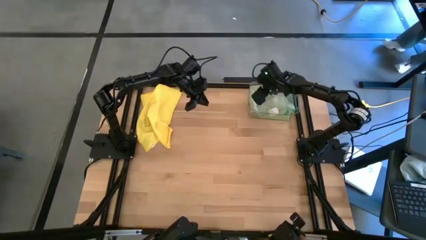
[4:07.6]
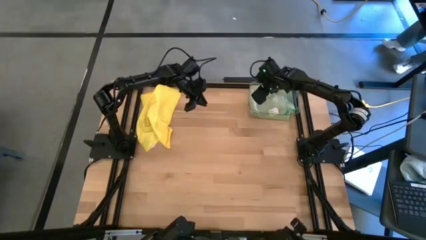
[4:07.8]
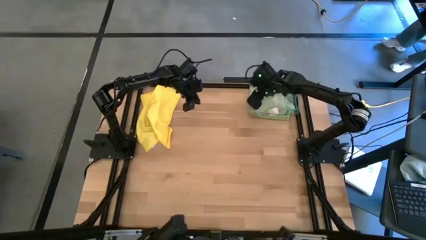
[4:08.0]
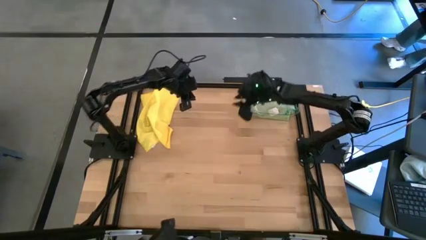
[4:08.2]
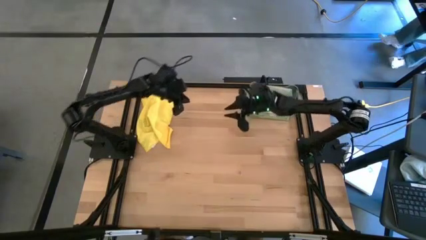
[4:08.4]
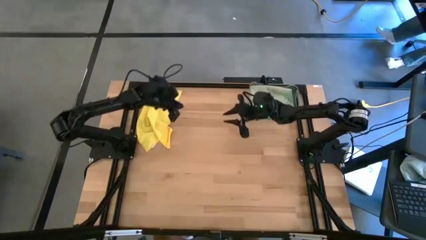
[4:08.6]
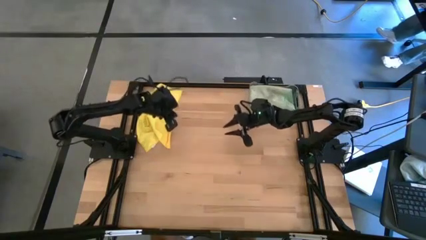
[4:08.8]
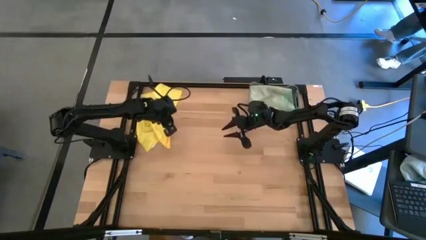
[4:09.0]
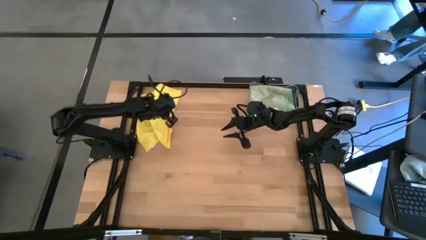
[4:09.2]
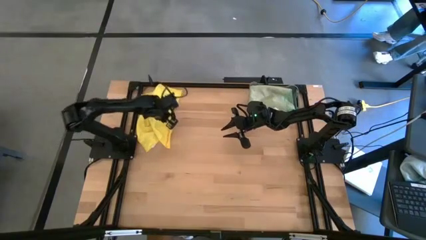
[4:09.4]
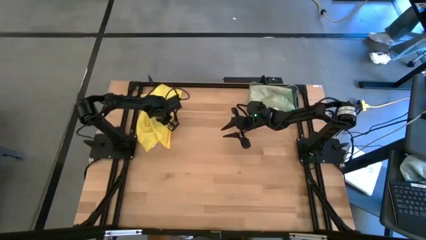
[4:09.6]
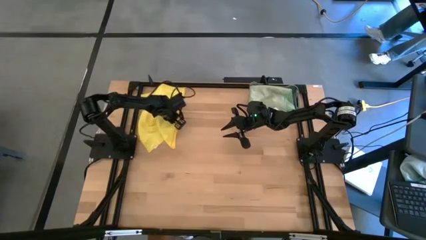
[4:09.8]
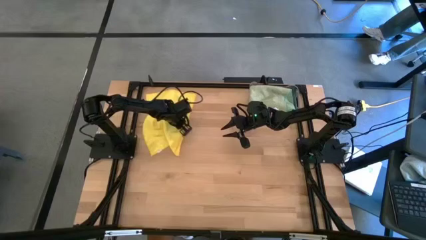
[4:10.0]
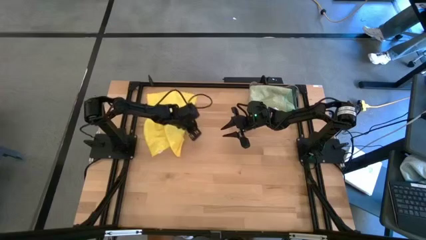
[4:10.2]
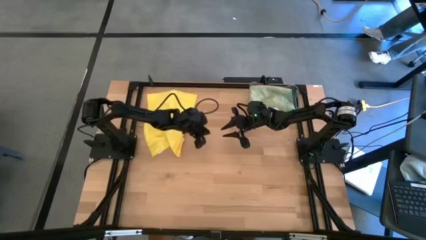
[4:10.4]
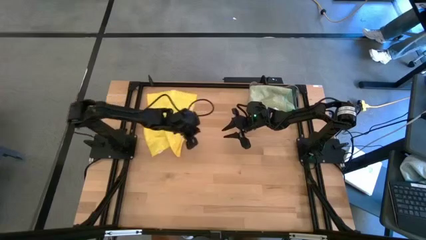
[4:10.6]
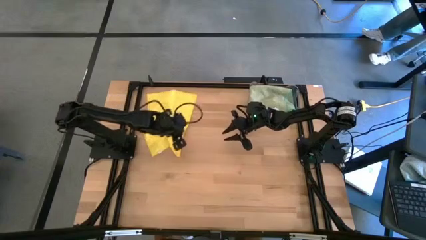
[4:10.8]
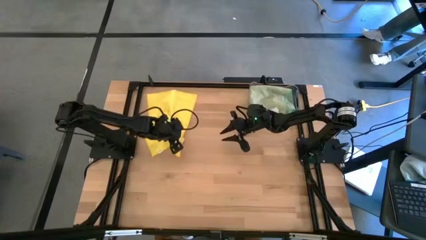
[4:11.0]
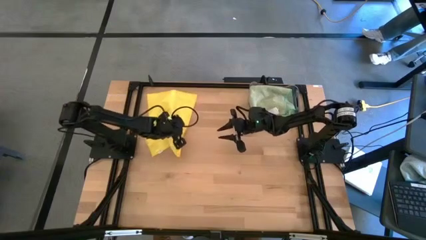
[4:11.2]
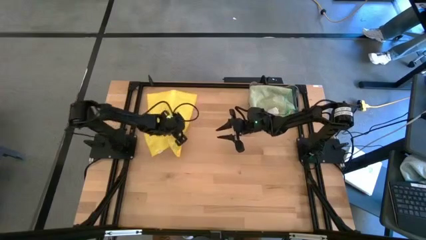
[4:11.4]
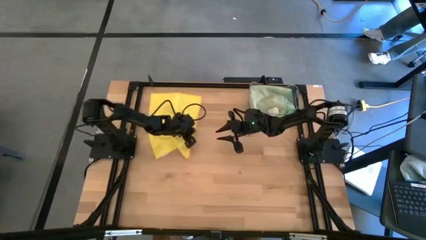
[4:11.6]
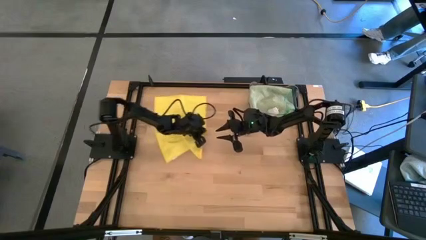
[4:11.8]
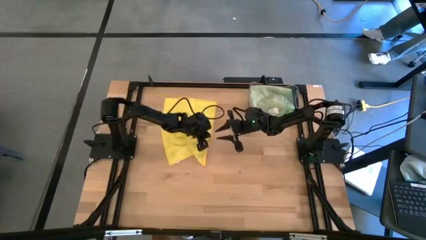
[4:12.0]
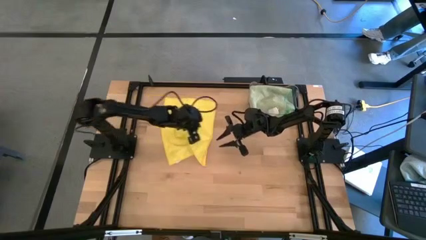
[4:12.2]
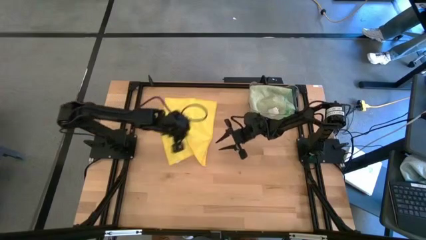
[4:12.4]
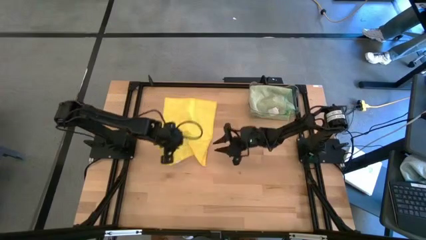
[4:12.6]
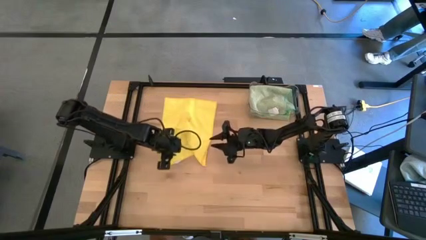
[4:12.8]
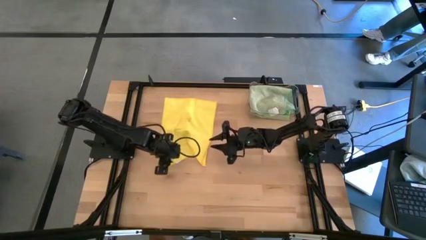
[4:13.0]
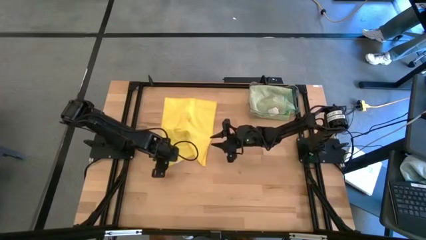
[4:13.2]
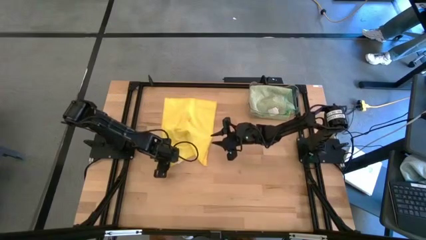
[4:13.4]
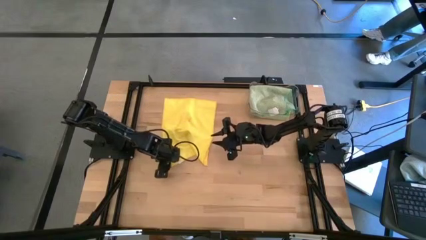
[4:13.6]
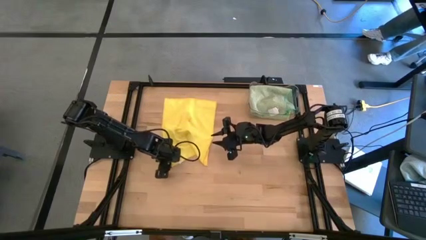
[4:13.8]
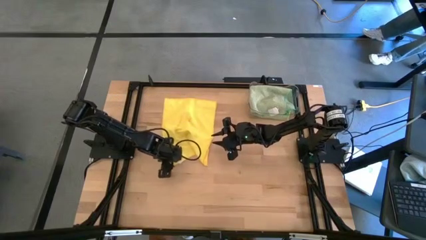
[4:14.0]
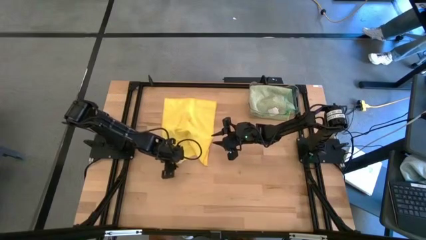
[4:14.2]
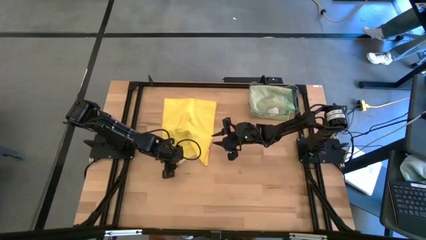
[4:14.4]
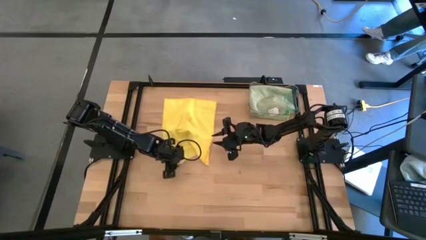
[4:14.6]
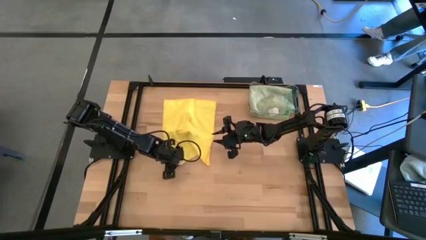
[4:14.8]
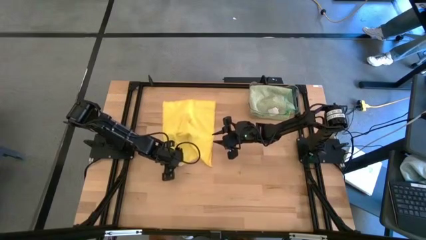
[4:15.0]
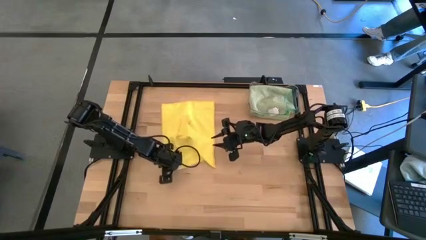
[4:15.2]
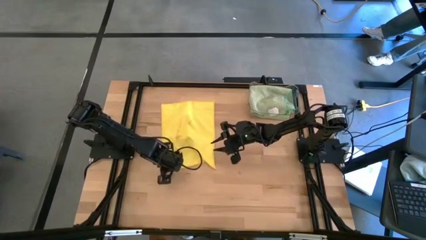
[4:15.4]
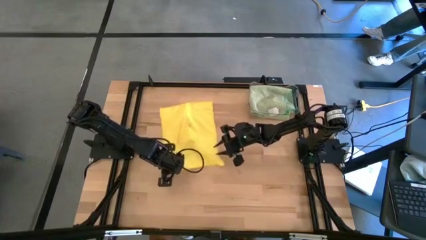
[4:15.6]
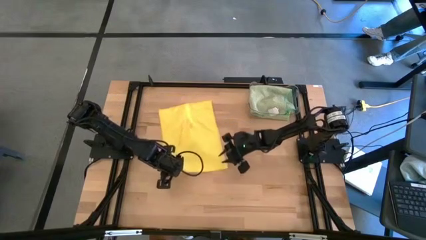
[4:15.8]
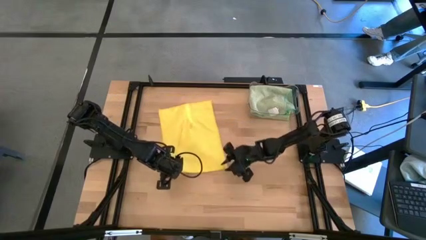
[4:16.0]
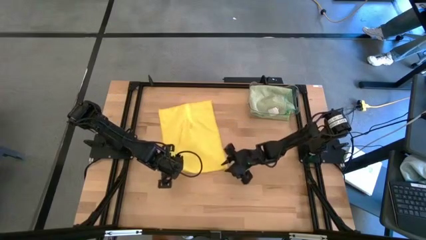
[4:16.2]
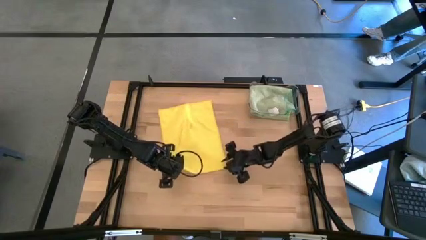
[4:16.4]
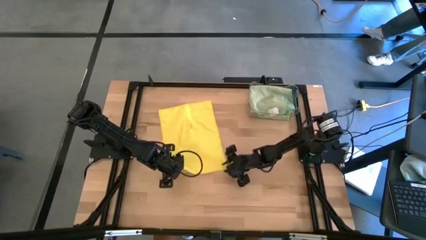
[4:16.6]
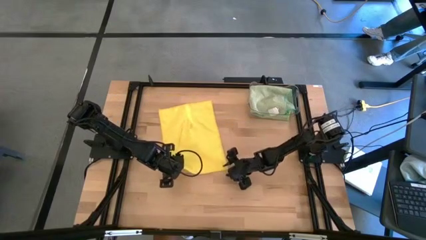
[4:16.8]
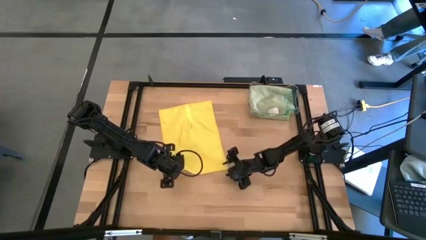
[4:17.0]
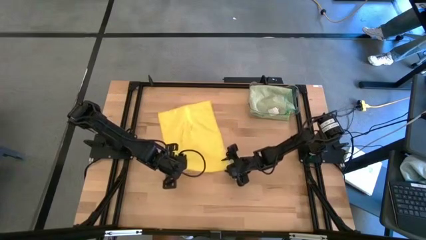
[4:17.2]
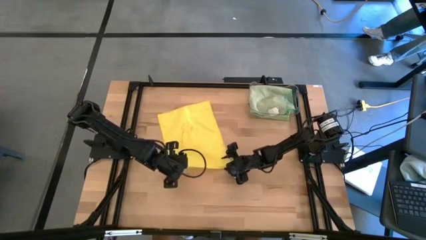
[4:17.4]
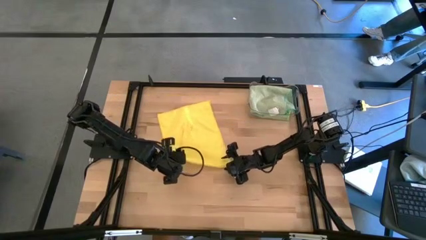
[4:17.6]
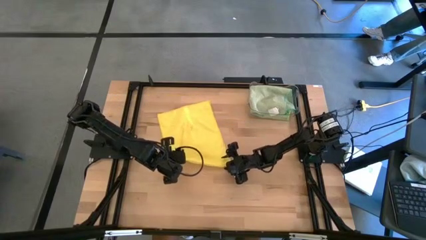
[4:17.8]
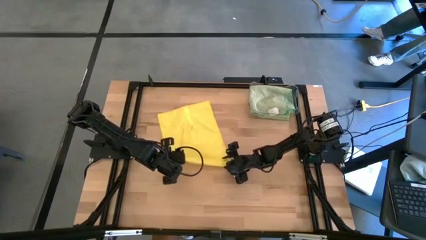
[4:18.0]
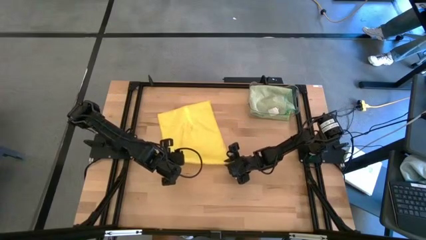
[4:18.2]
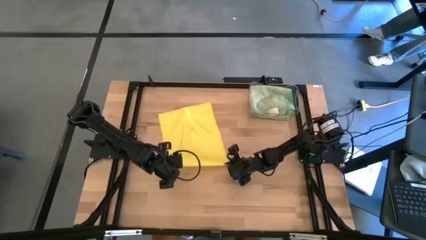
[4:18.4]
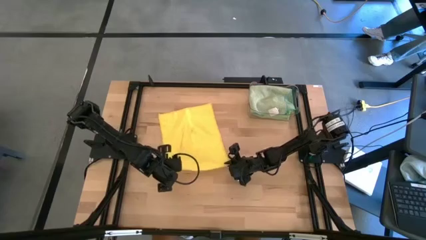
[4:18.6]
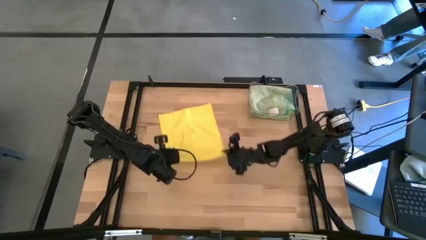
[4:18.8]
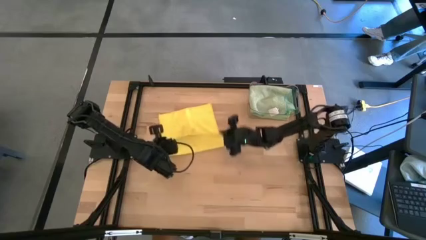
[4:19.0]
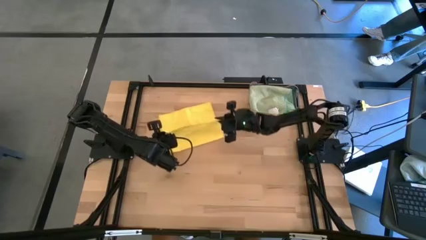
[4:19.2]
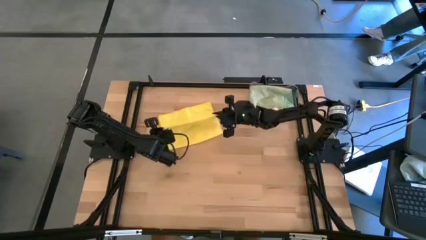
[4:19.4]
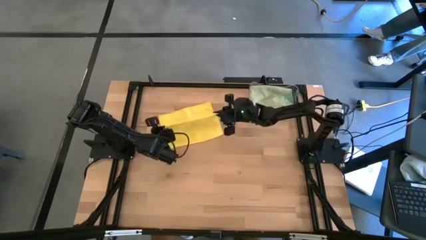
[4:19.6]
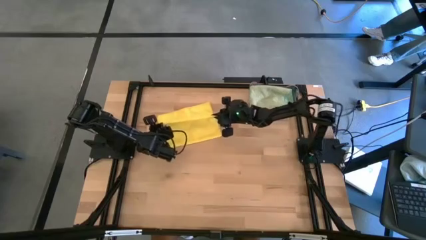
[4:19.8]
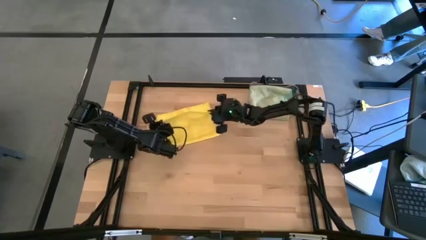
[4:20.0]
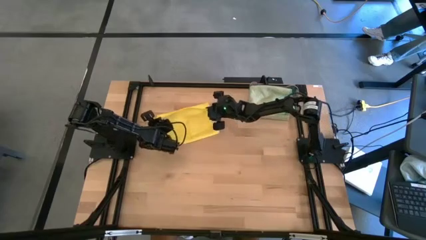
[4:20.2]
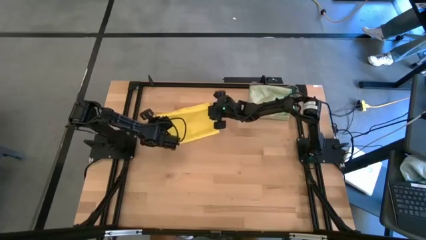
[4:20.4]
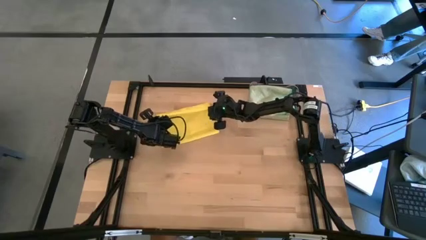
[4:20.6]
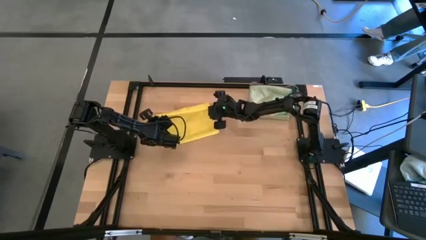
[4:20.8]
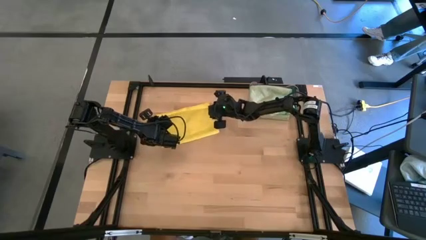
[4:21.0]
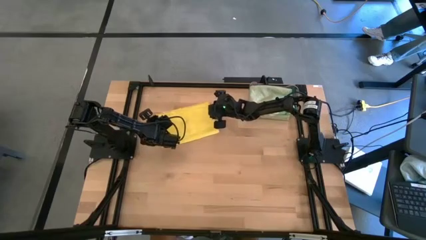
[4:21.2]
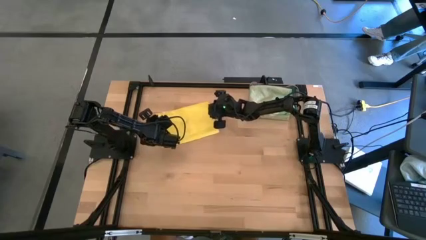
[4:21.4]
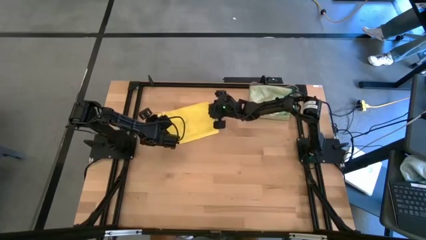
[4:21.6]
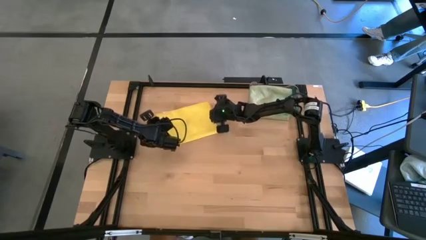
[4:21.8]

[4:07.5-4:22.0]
Task: Fold microfiber towels
Fold the yellow cloth

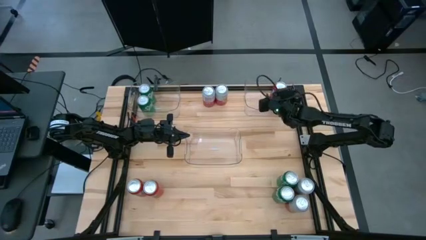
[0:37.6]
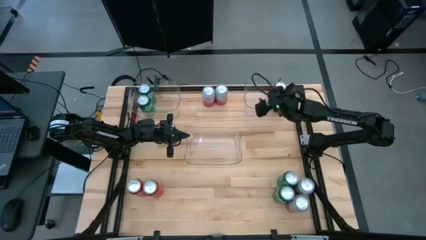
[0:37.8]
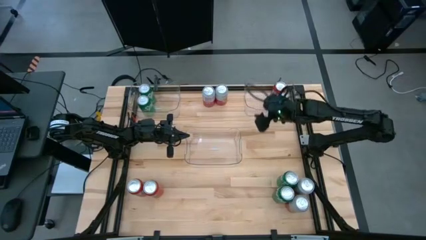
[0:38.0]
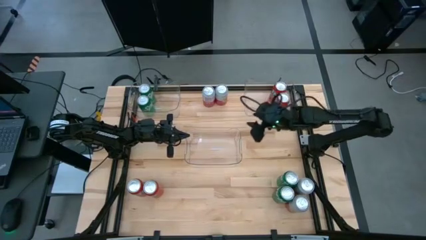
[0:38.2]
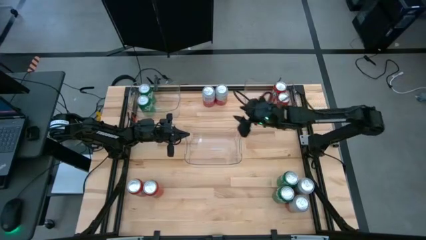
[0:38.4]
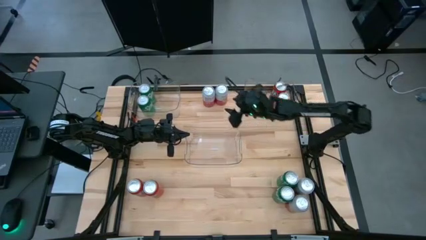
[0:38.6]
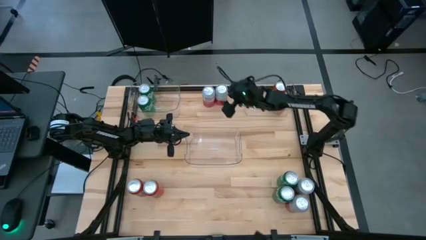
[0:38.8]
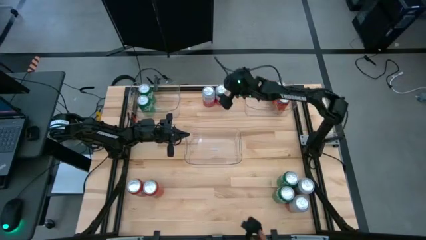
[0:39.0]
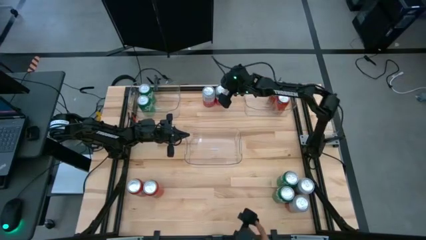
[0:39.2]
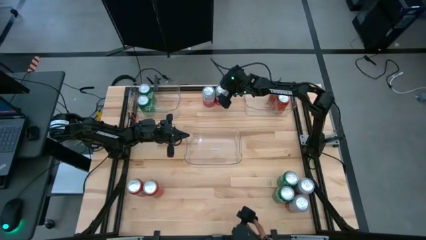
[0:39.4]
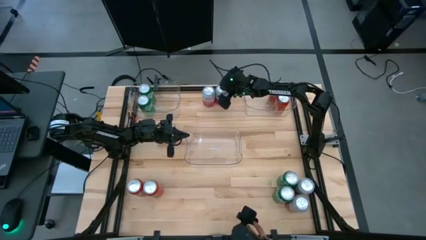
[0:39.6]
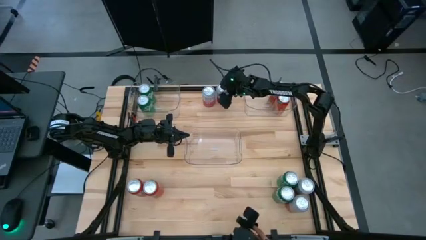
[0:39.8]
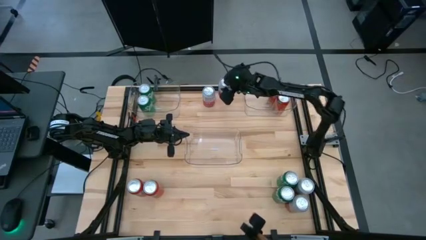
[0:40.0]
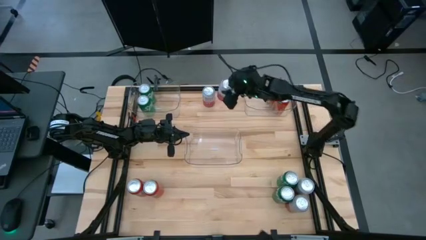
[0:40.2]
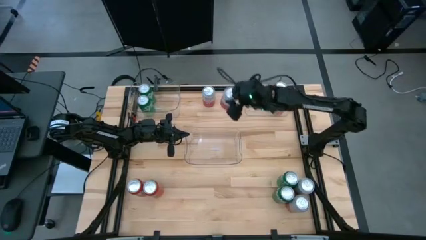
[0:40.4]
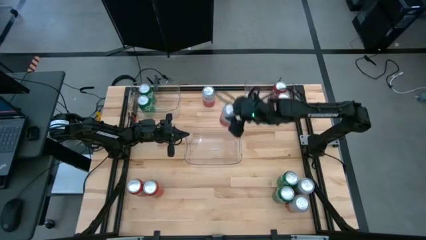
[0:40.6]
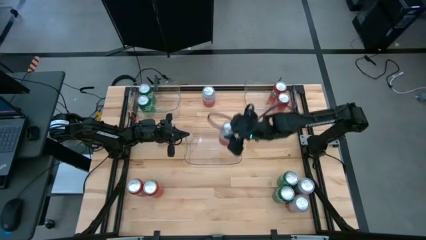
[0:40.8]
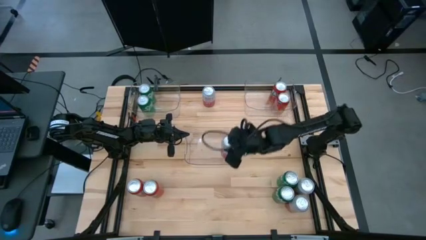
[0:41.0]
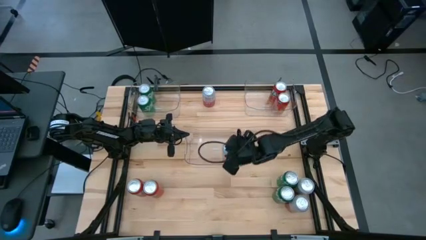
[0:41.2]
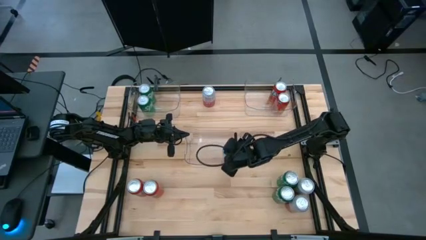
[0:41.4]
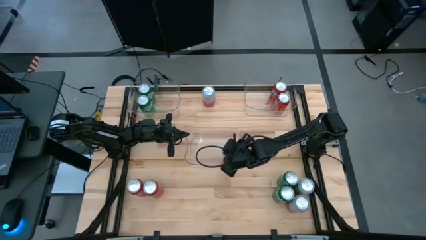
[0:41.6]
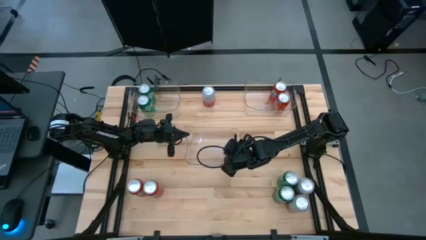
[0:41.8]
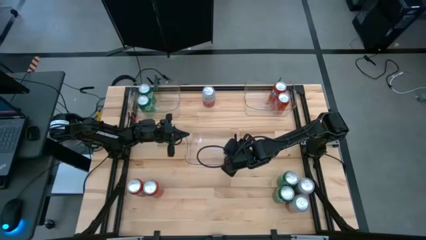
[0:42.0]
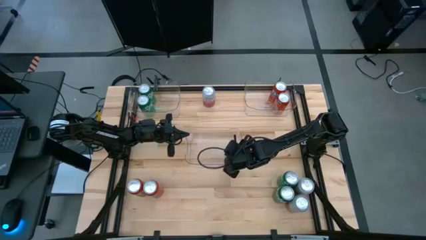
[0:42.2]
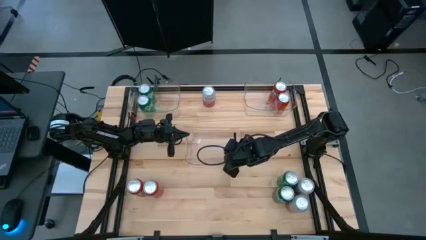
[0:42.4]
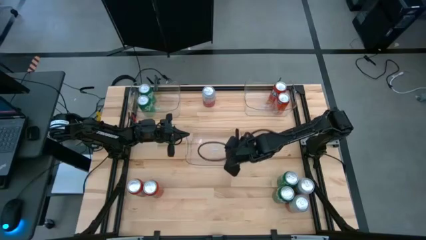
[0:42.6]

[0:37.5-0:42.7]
Task: Sort soda cans
Put the pink-white soda can into the bottom transparent bin
